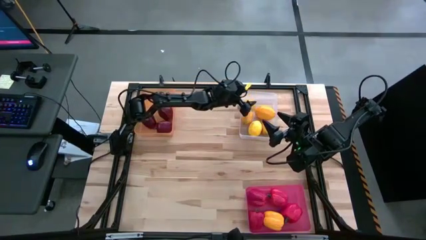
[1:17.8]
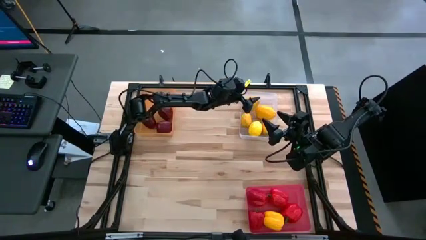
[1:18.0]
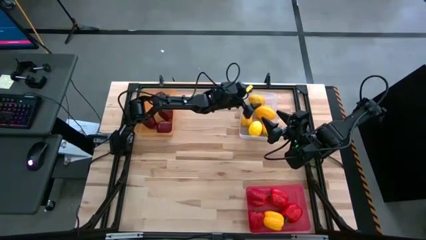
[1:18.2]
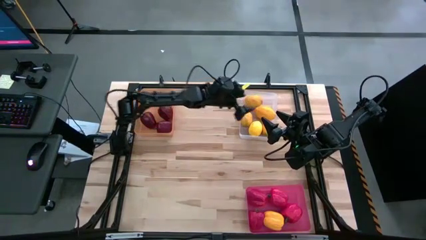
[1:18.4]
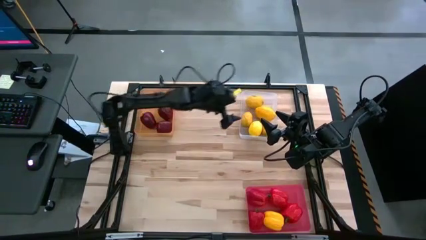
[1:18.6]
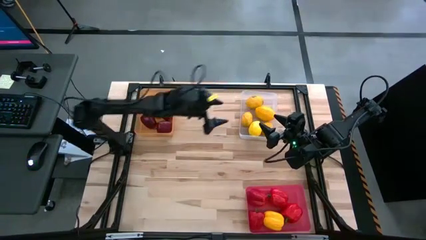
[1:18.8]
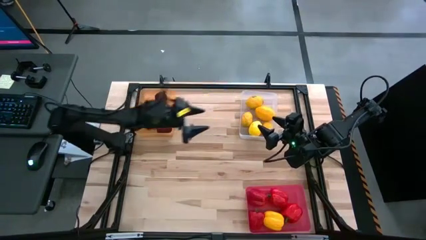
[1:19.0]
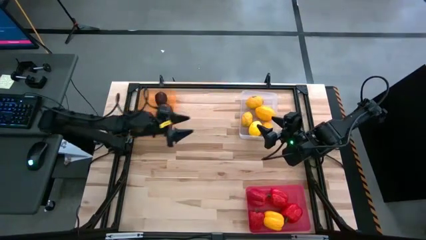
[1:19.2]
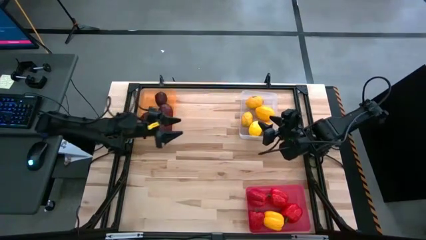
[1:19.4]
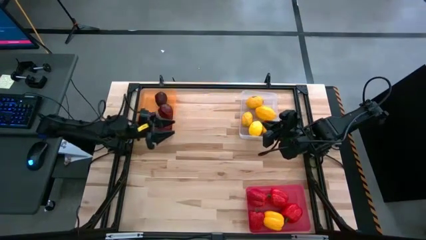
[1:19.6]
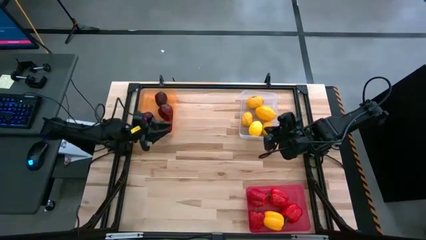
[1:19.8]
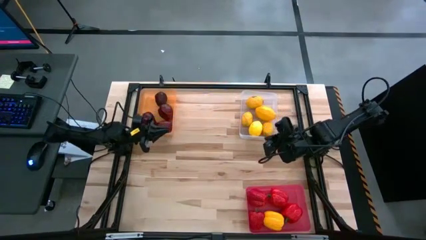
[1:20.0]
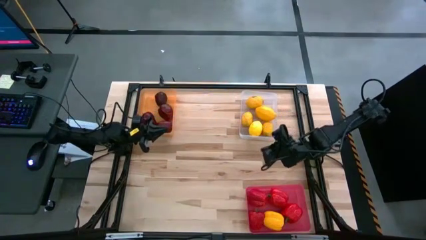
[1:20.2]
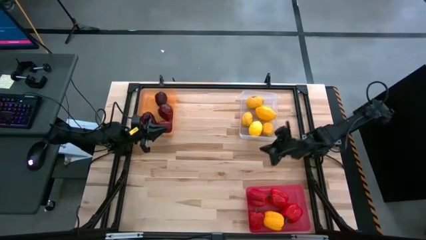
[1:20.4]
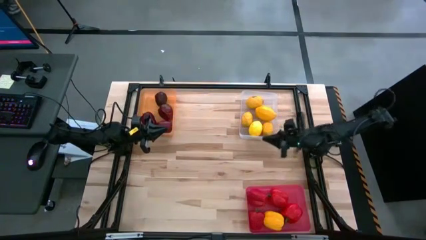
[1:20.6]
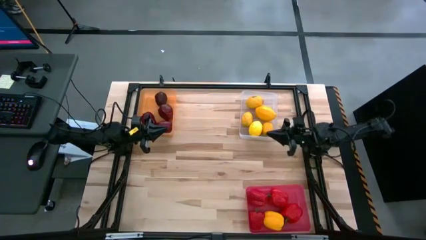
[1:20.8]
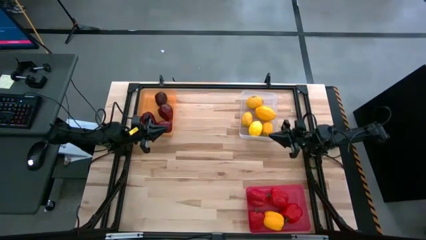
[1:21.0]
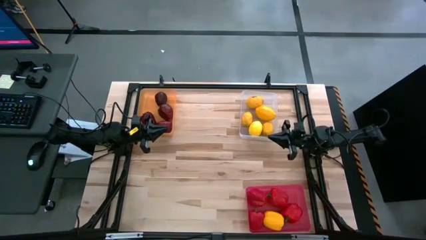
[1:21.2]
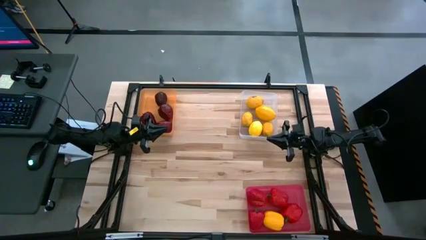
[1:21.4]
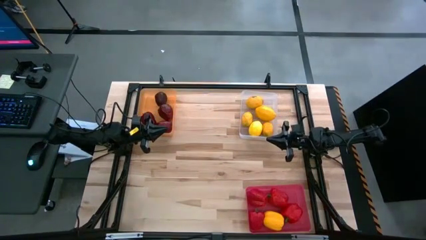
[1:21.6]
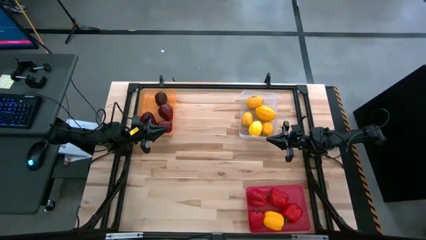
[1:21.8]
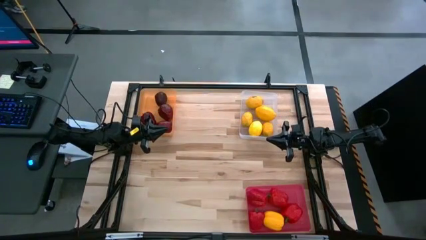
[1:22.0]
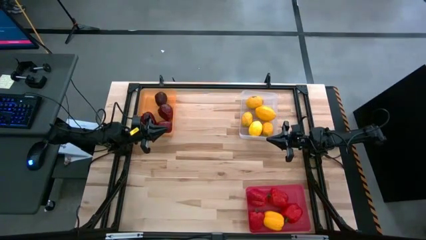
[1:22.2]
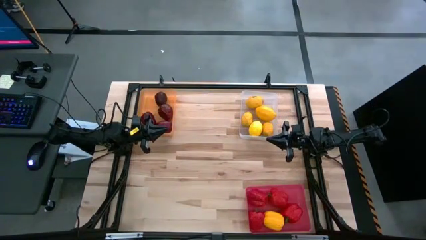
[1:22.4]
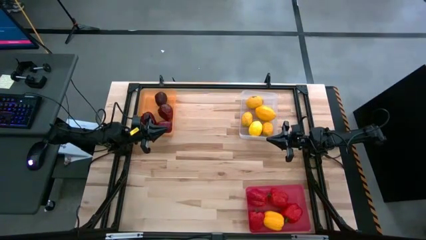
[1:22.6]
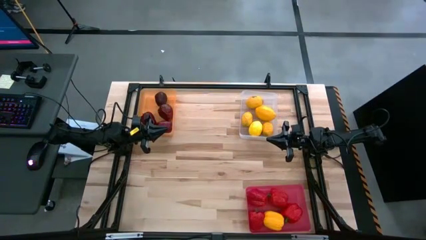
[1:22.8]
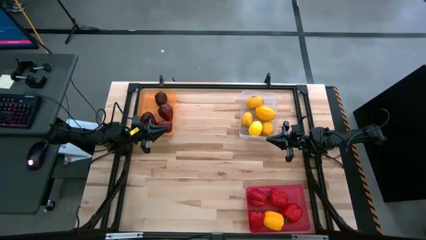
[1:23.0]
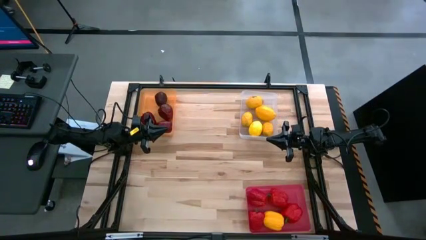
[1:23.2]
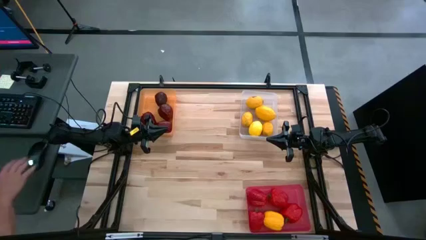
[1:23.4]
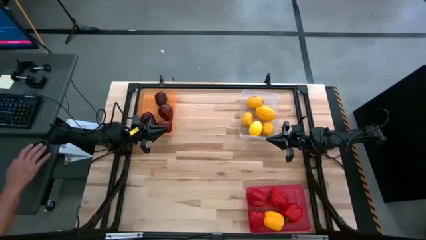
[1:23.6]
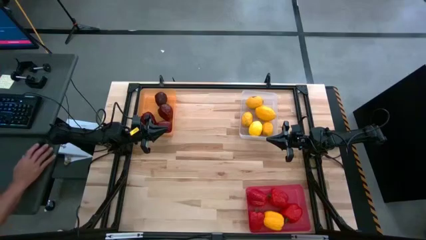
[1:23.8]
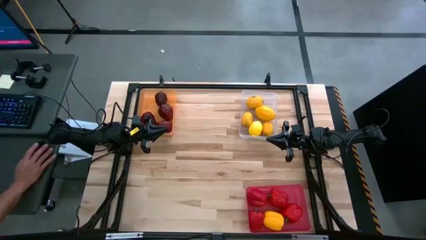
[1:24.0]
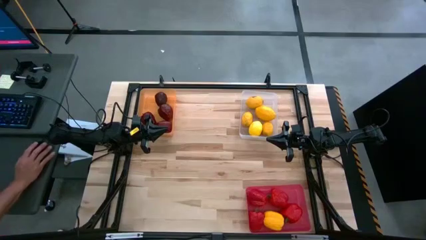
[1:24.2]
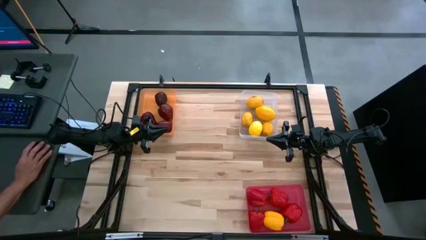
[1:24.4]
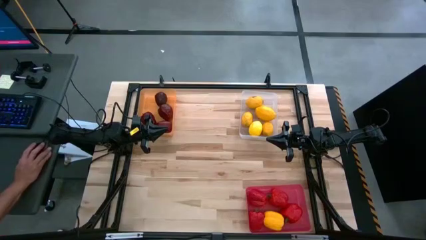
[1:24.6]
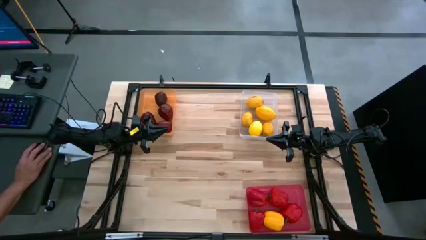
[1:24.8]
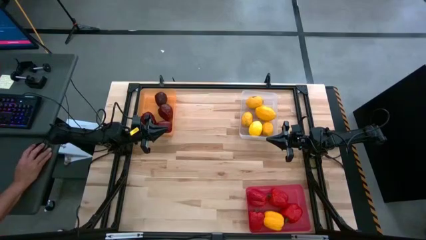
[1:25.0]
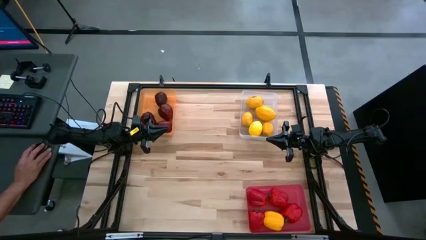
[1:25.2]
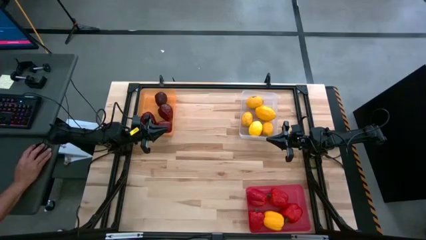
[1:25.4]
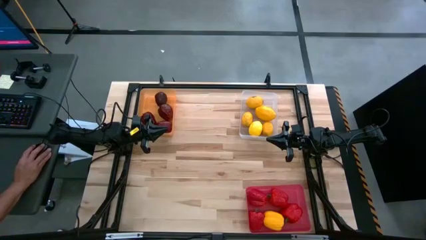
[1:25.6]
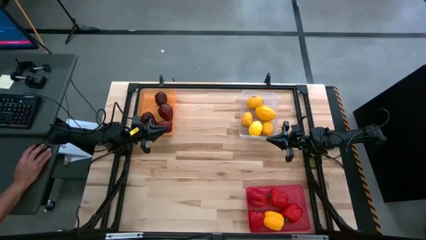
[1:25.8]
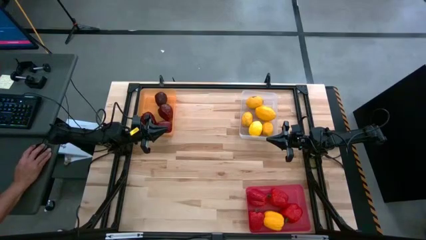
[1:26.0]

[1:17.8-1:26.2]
Task: Sort produce into baskets
Return to Home Position

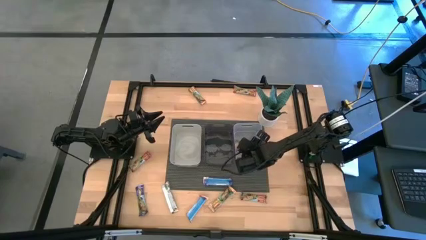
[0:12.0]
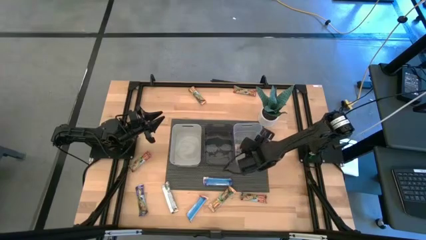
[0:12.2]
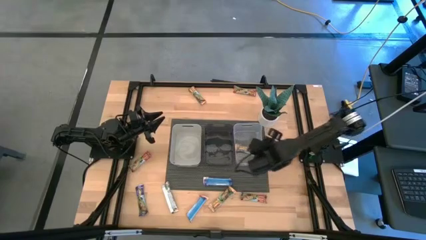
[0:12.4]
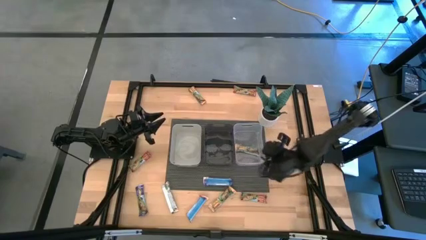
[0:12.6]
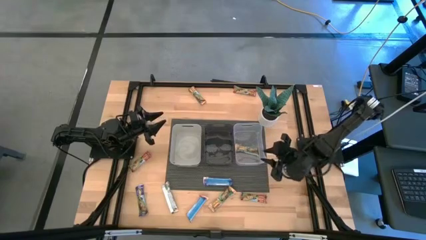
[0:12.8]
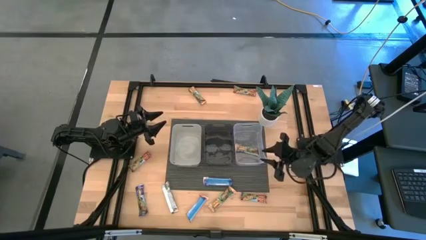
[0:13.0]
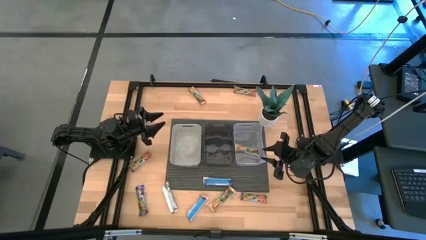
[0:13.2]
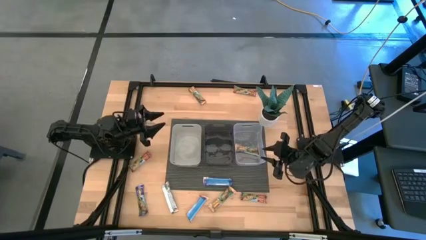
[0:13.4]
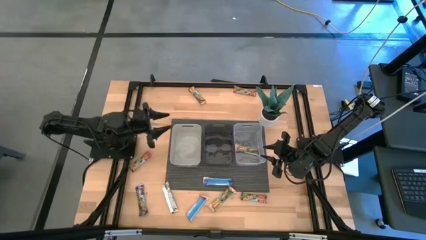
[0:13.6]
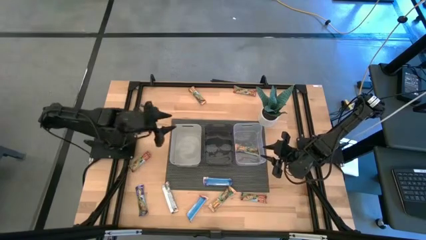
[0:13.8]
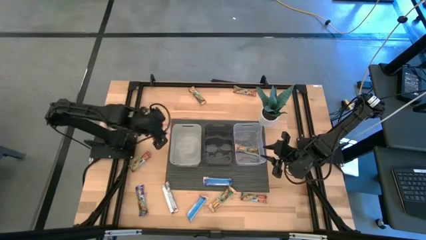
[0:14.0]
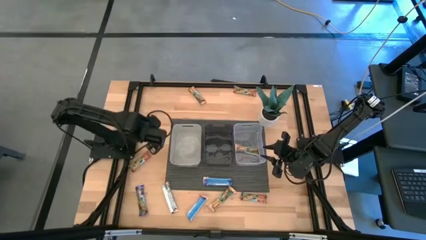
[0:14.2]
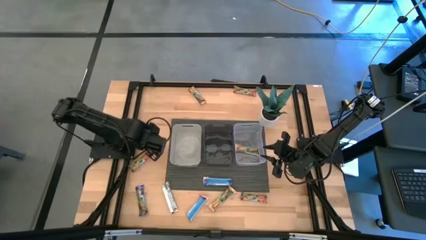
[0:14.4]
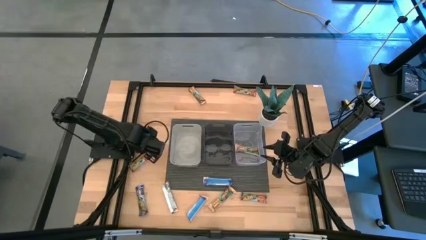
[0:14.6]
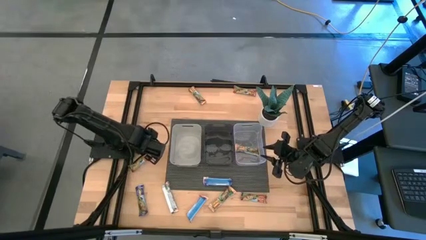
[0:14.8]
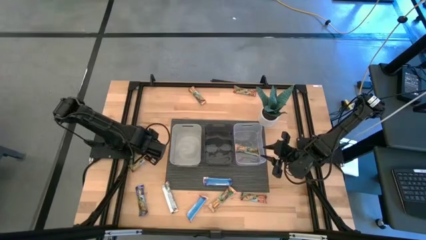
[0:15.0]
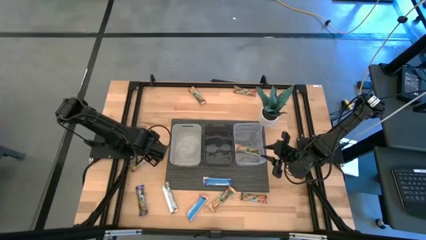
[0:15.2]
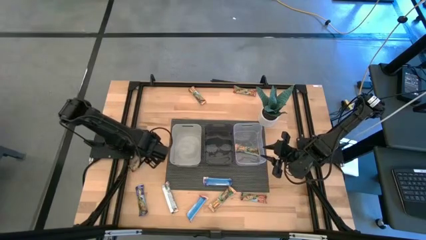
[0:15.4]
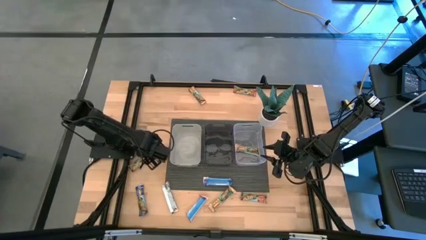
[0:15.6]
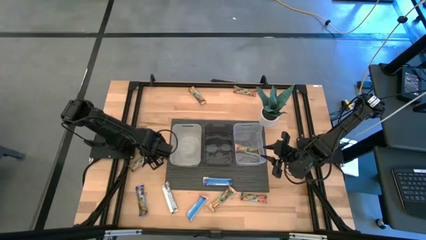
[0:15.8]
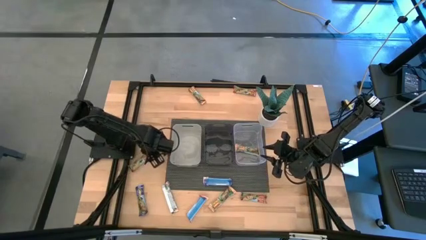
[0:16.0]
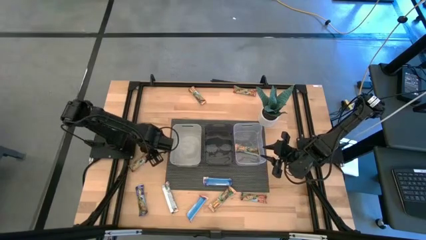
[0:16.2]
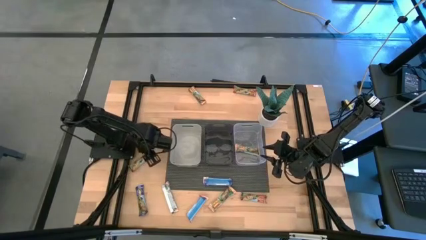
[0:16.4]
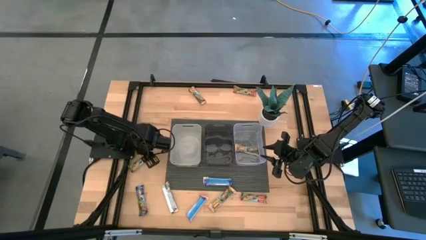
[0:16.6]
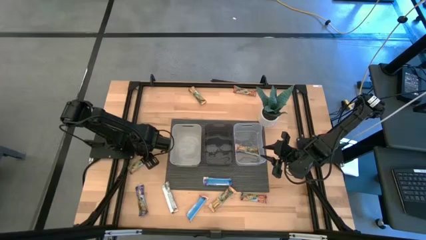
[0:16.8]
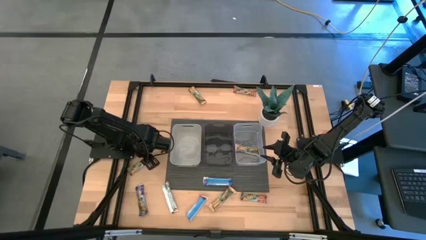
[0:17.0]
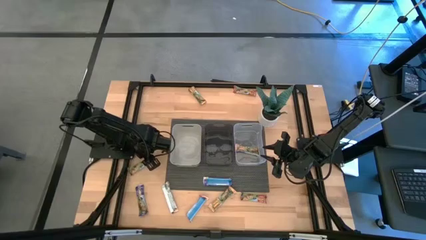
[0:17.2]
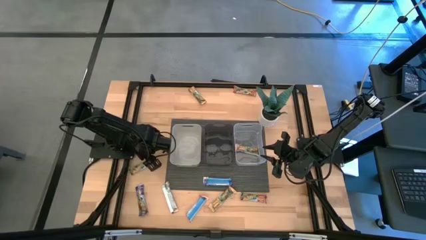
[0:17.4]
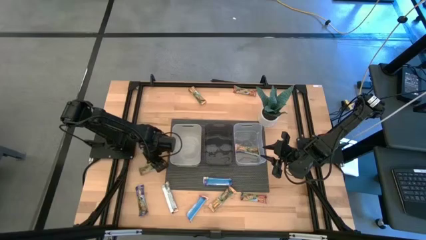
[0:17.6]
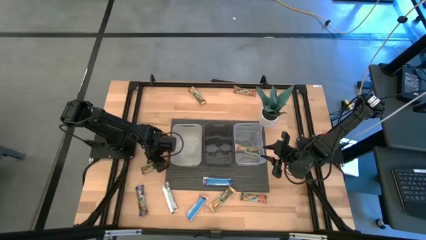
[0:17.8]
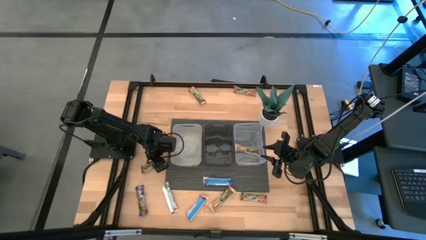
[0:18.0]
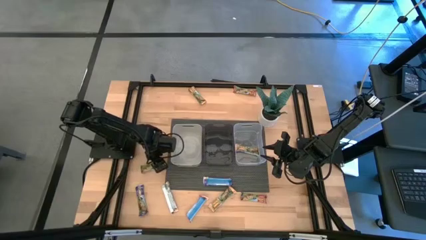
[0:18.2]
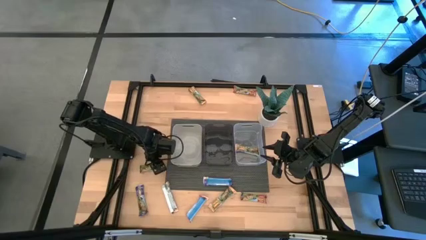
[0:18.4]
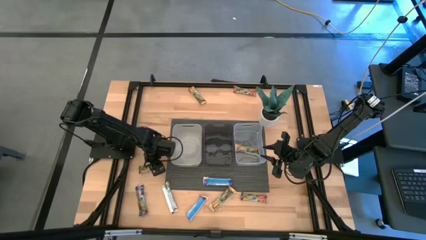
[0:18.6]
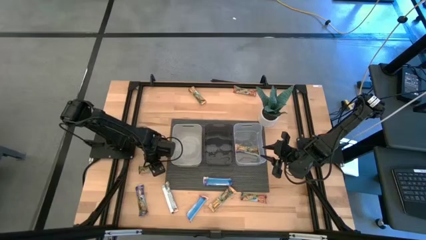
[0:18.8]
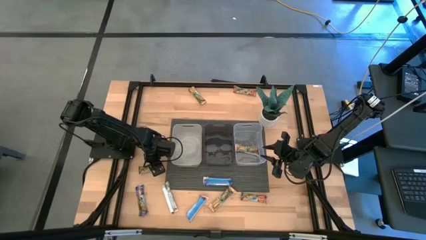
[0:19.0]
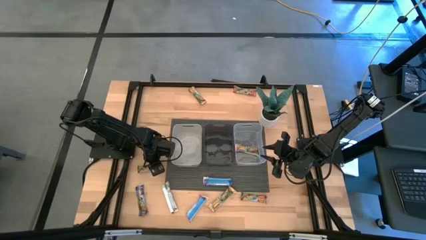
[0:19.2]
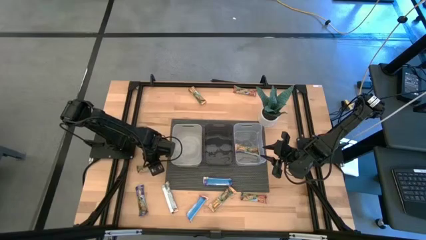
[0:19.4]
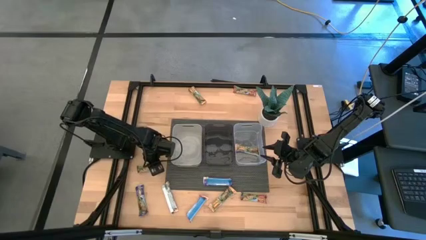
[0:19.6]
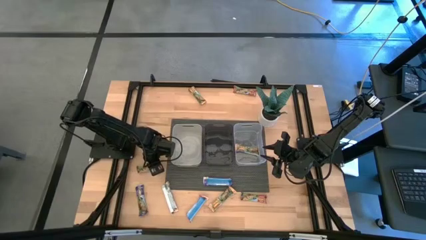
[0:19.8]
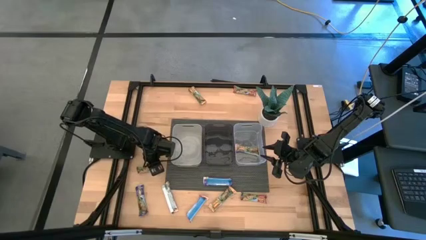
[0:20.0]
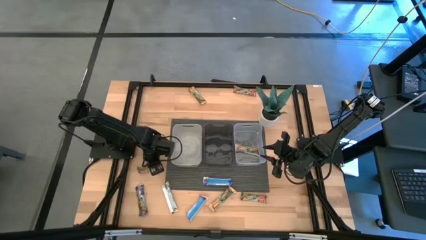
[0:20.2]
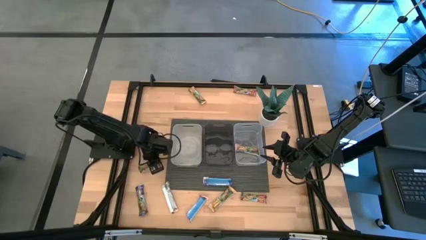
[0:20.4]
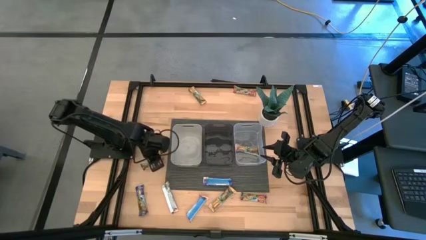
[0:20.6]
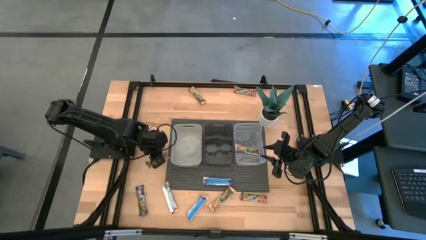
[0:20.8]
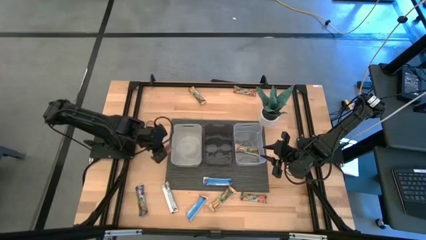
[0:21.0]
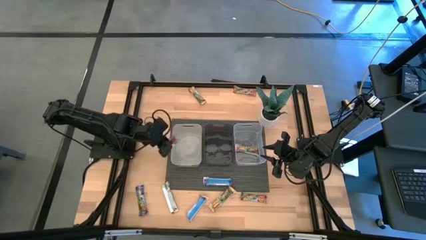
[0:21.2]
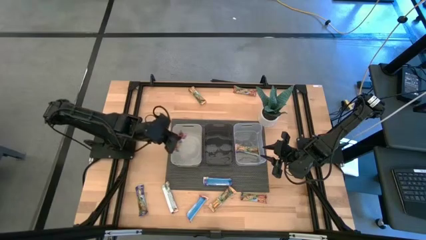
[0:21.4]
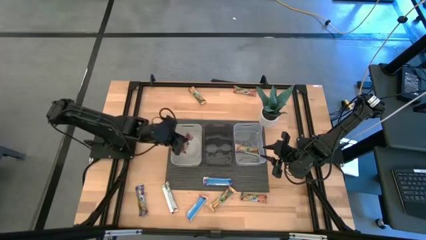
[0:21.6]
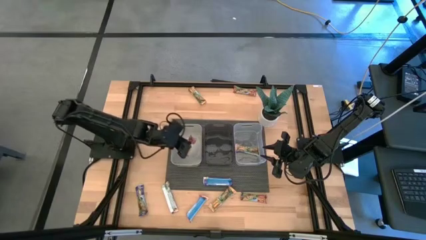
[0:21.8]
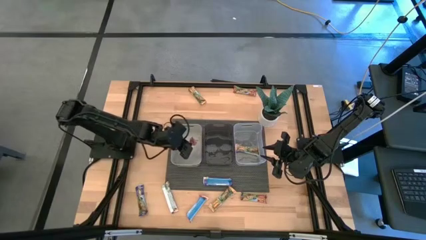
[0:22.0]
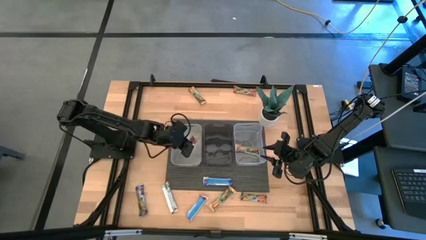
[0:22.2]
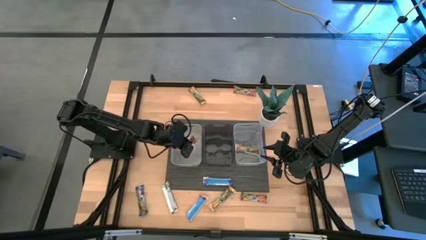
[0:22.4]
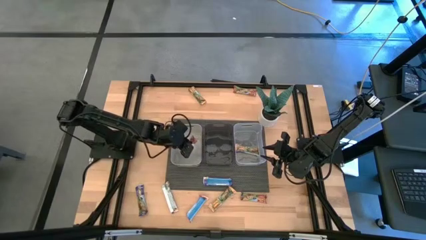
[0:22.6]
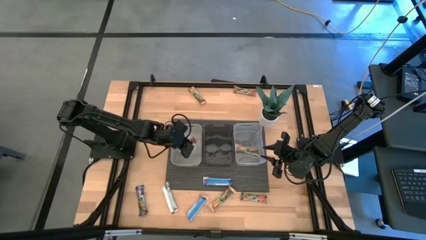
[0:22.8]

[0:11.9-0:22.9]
Task: Pick and place Granola Bars by type
Put the red granola bar into the gray bin
